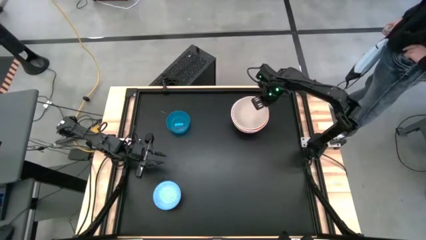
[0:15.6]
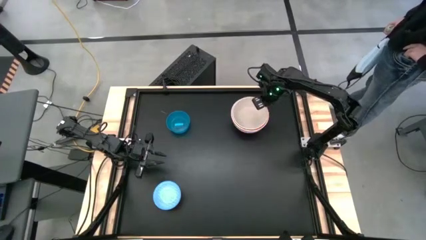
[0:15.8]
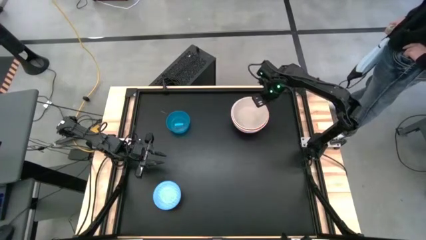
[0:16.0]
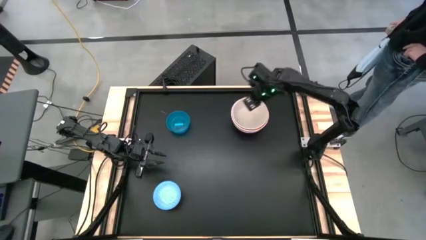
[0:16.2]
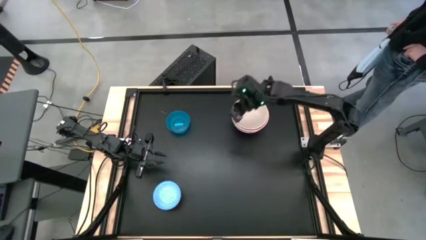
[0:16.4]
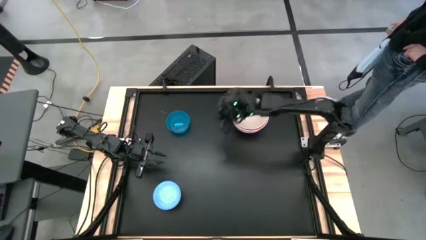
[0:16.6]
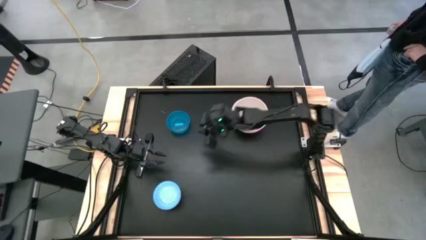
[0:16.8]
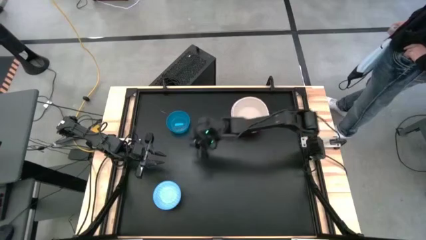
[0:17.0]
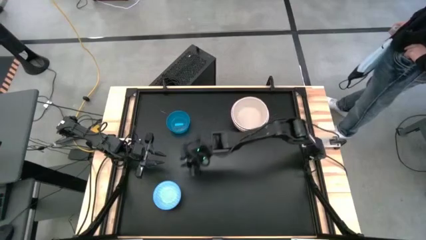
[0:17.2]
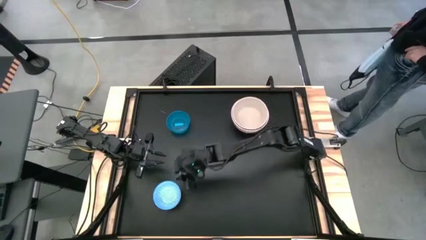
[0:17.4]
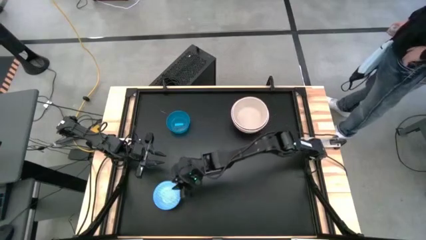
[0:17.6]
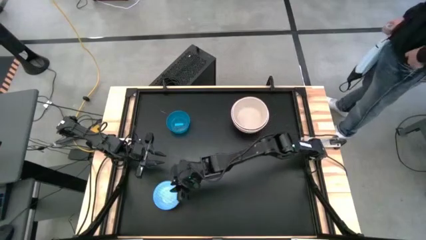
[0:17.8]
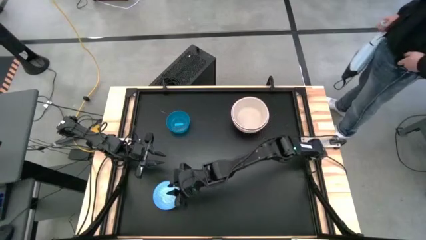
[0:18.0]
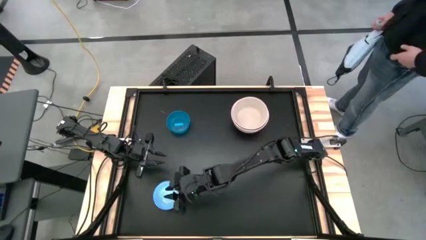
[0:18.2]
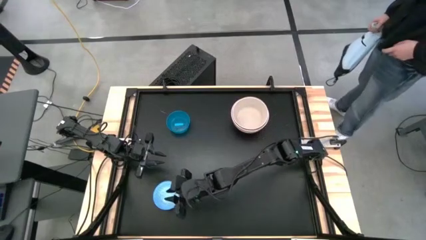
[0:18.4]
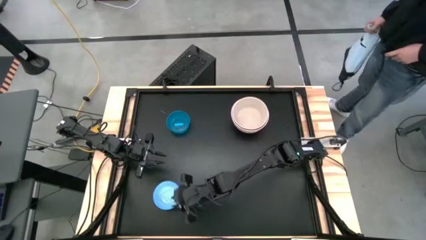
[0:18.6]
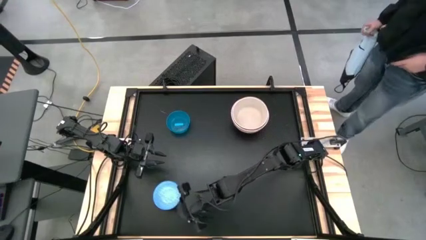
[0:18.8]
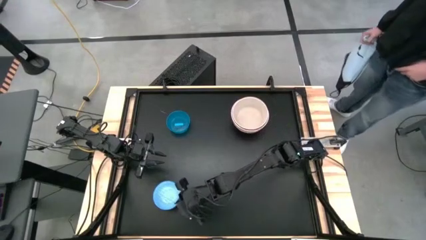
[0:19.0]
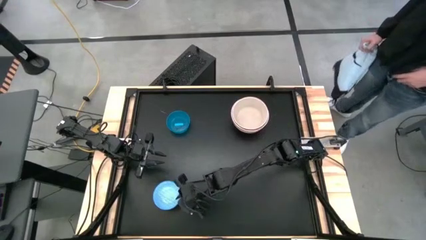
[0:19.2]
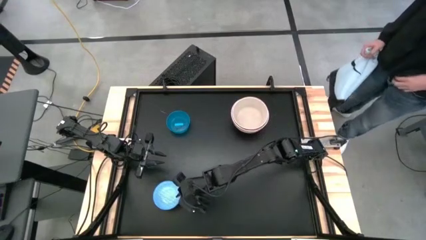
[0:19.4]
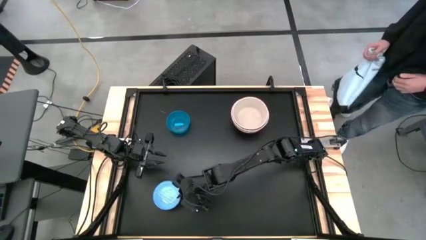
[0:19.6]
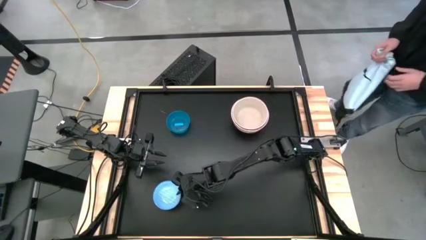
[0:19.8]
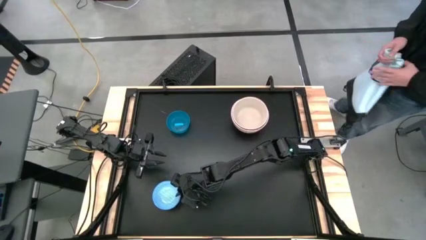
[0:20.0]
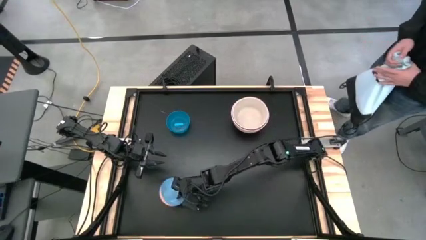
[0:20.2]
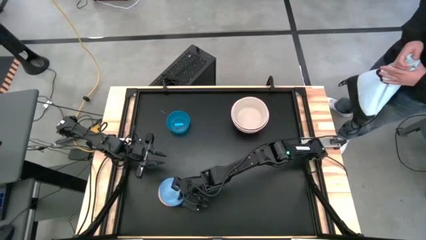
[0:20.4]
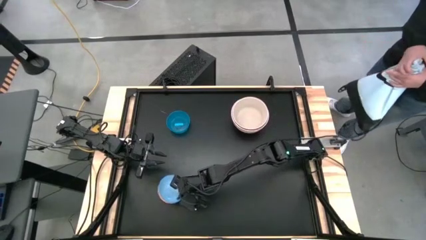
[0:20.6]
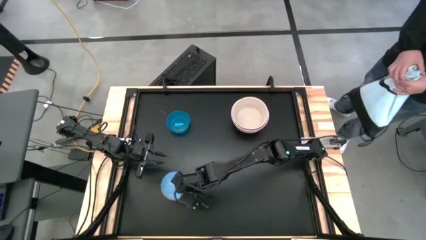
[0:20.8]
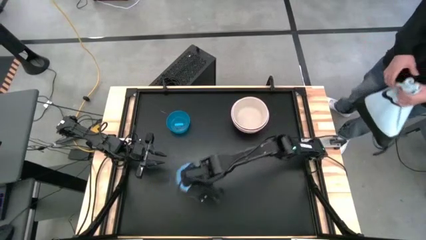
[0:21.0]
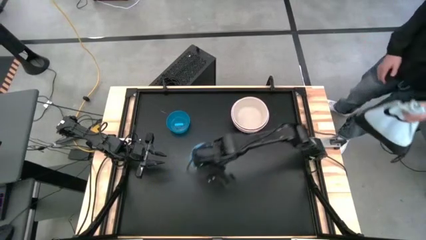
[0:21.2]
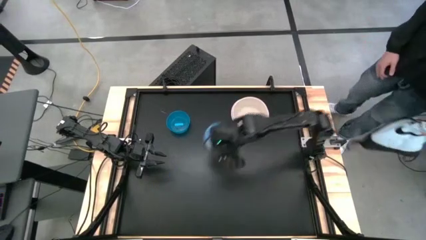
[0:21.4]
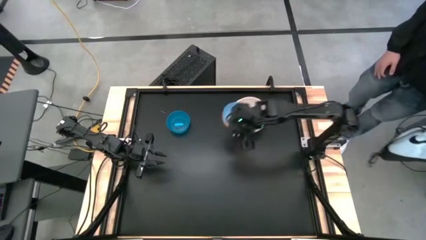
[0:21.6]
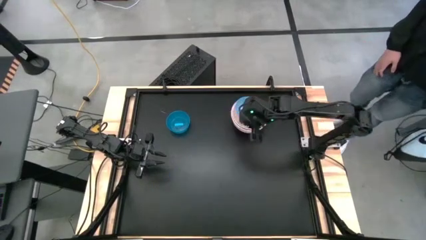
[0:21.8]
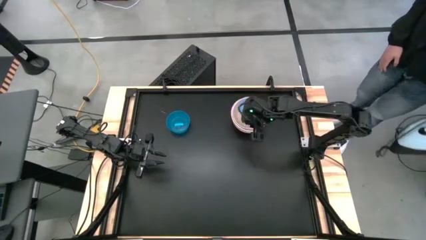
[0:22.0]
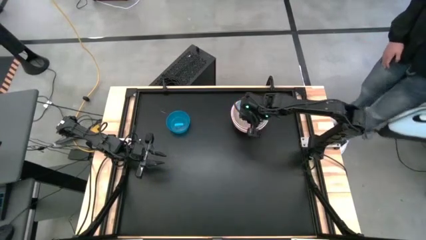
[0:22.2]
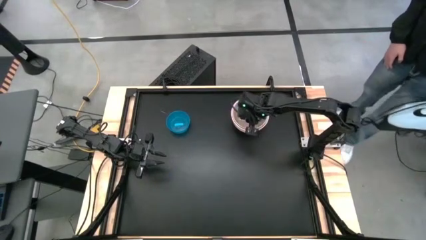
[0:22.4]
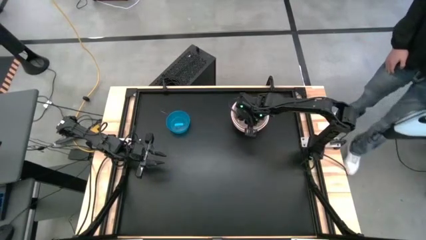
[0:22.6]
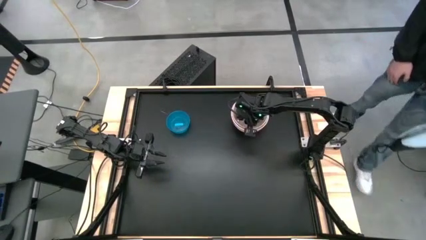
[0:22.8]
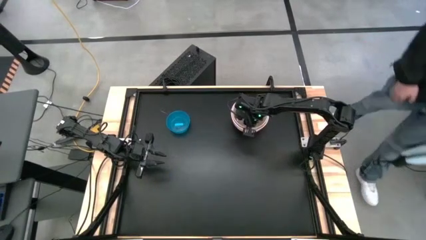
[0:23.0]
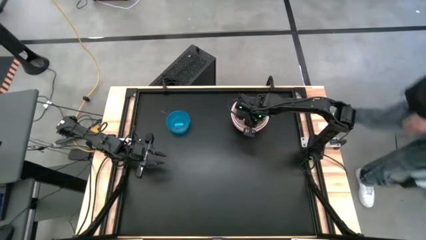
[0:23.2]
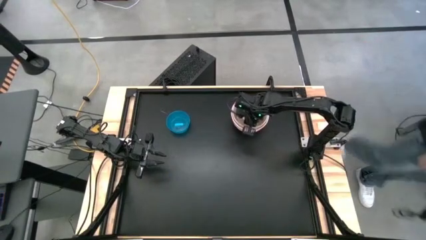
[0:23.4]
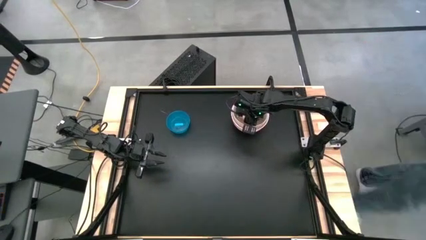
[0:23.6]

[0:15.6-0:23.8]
Stack the orange patterned bowl into the white bowl

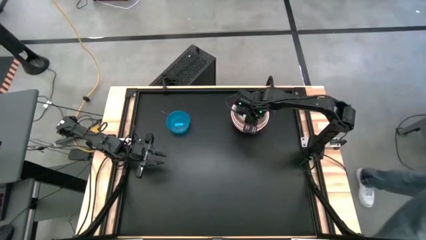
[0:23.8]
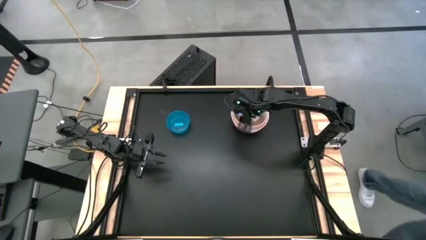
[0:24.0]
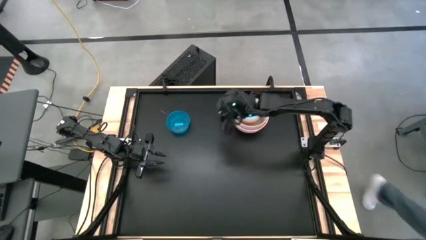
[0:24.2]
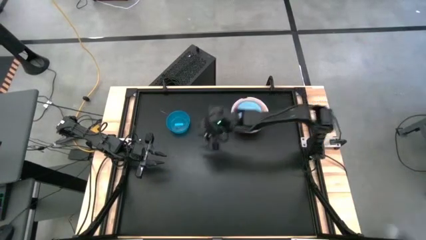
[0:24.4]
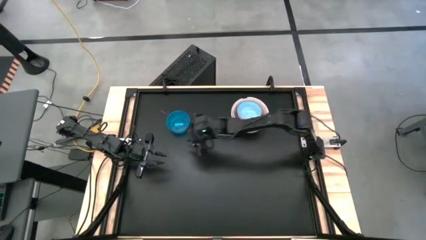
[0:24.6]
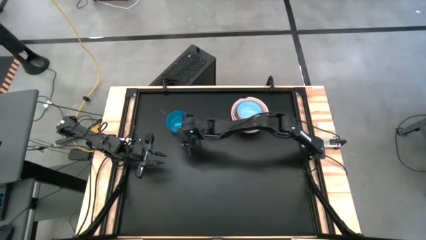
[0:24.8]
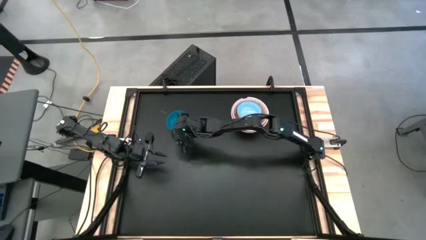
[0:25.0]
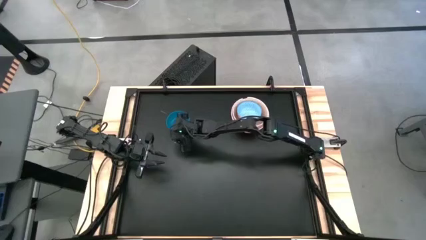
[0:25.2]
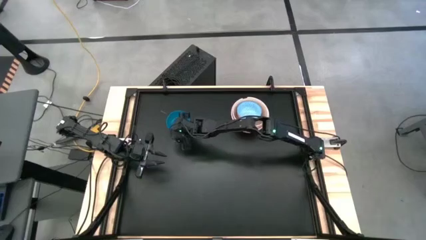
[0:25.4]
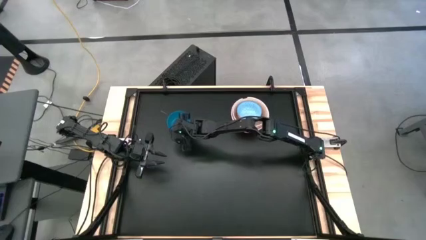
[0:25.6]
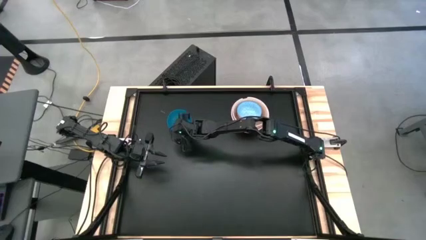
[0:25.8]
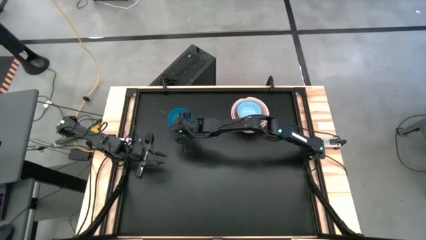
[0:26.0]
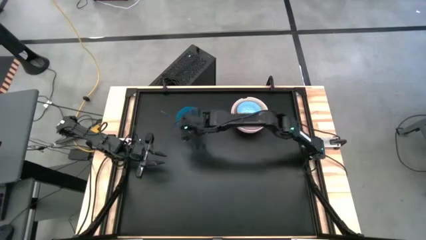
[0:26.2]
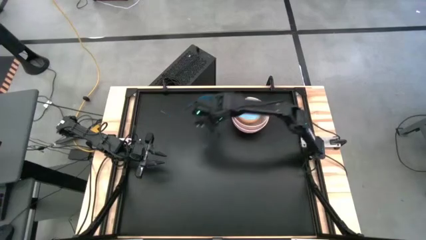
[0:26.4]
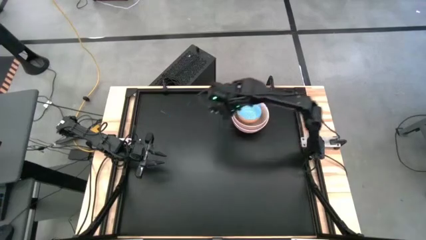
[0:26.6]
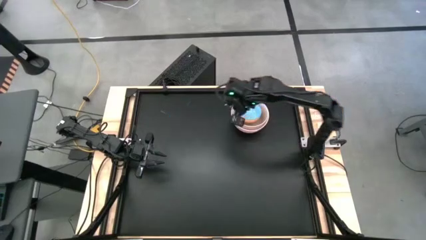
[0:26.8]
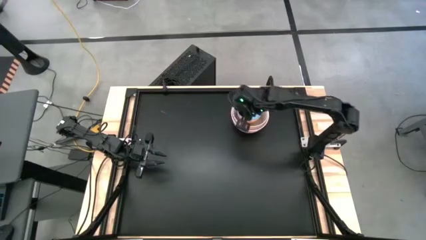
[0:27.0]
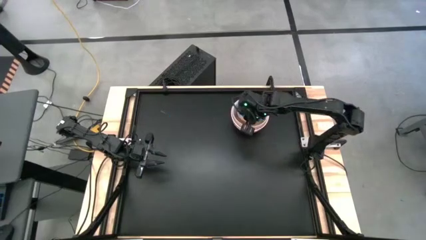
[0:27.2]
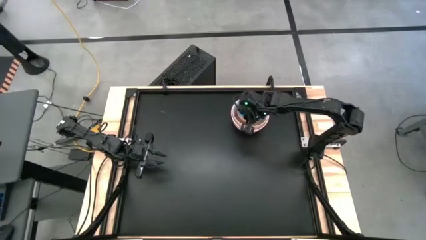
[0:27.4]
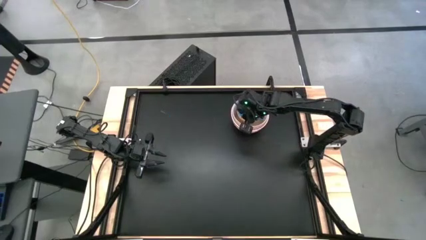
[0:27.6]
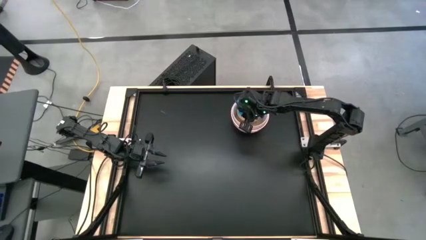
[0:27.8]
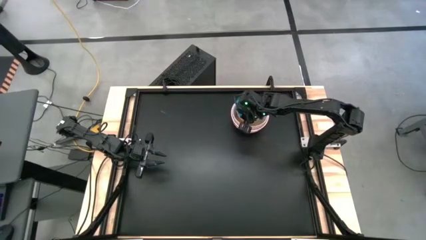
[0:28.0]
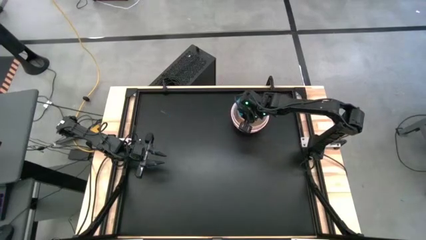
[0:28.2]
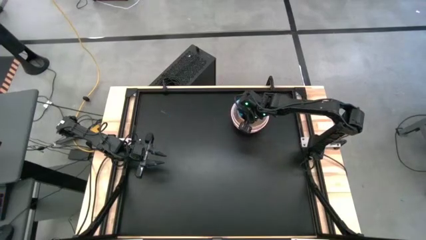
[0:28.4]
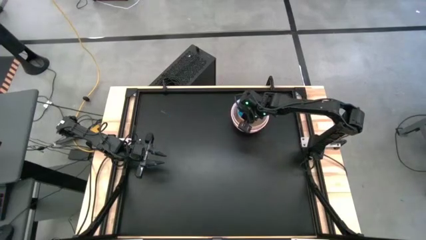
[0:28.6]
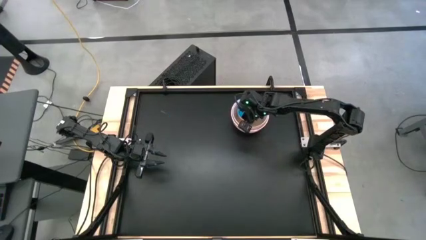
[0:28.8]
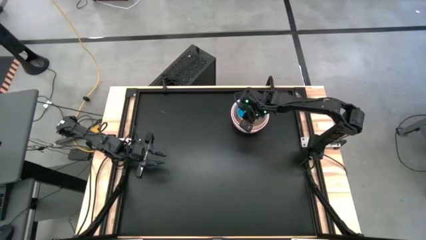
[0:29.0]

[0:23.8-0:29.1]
Stack the blue transparent bowl into the orange patterned bowl

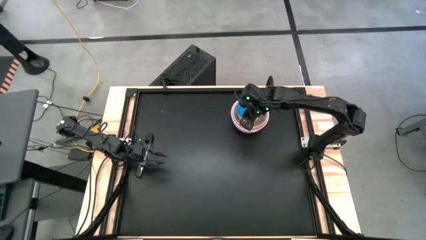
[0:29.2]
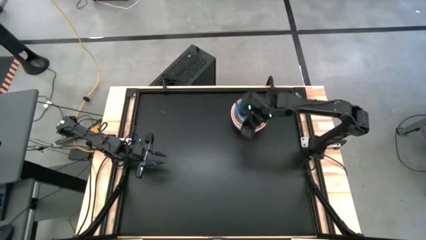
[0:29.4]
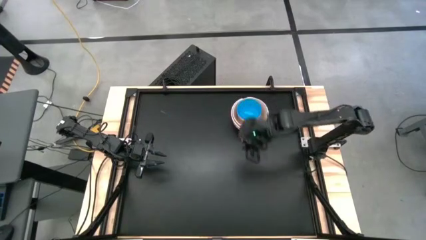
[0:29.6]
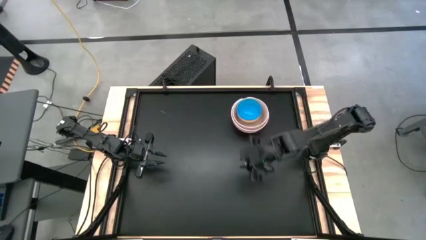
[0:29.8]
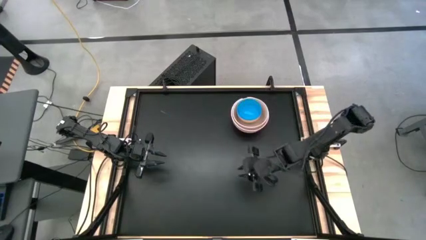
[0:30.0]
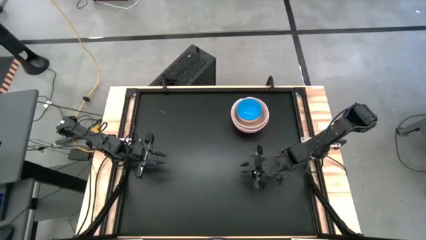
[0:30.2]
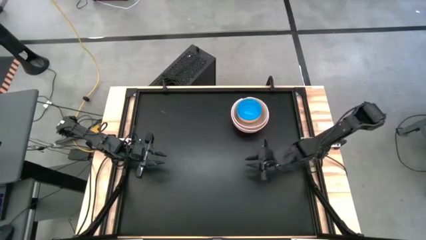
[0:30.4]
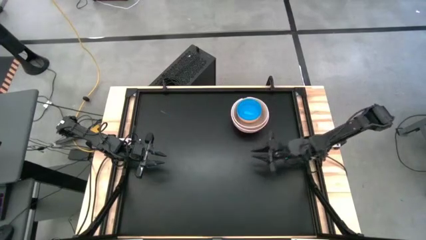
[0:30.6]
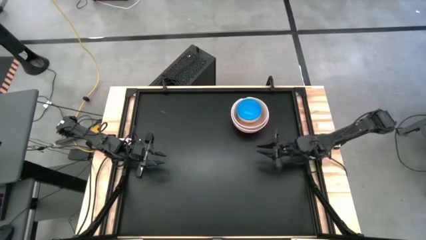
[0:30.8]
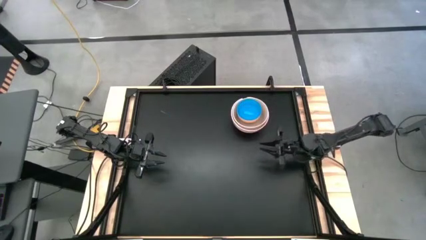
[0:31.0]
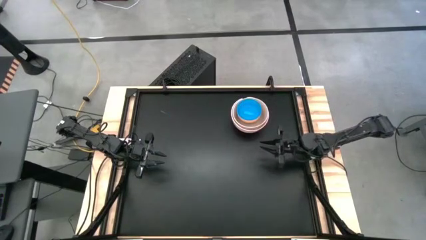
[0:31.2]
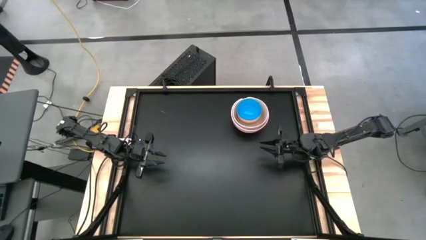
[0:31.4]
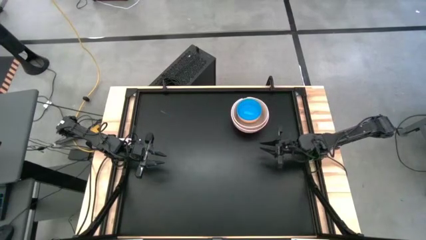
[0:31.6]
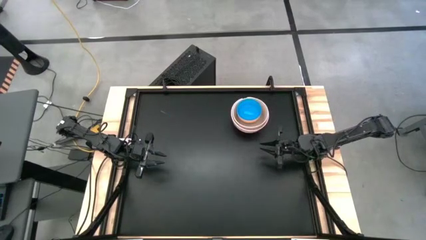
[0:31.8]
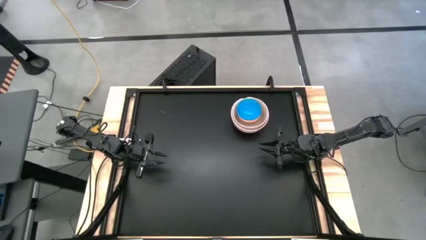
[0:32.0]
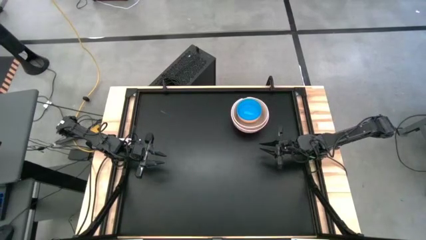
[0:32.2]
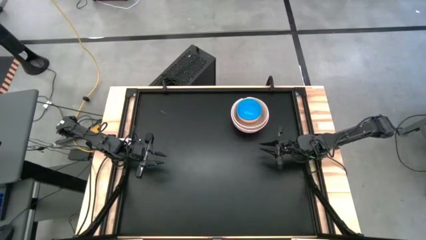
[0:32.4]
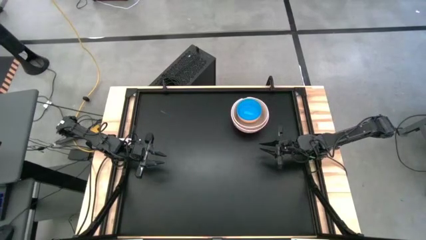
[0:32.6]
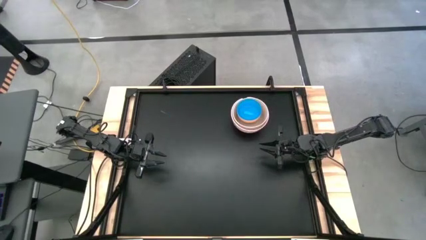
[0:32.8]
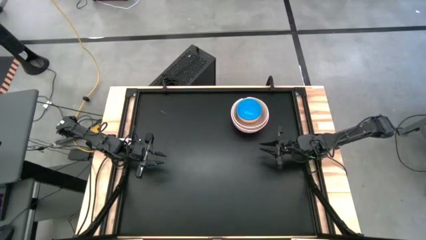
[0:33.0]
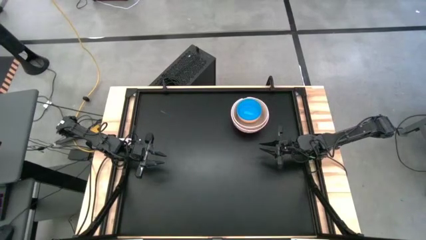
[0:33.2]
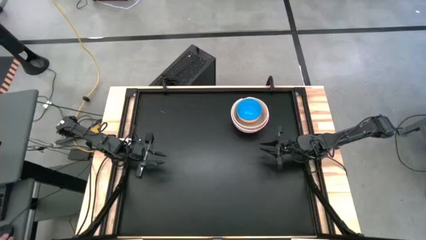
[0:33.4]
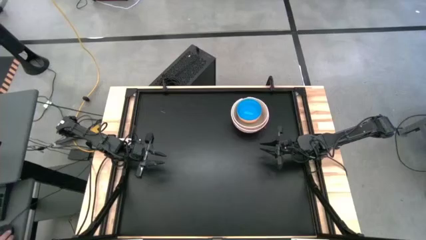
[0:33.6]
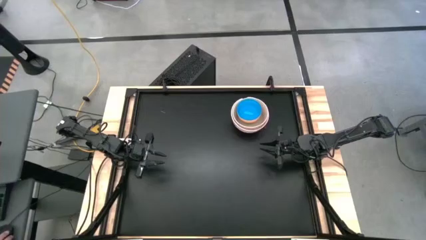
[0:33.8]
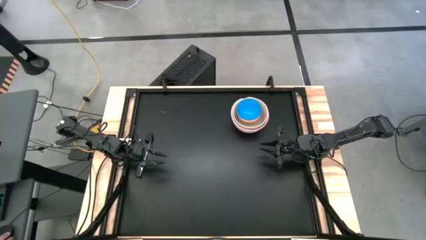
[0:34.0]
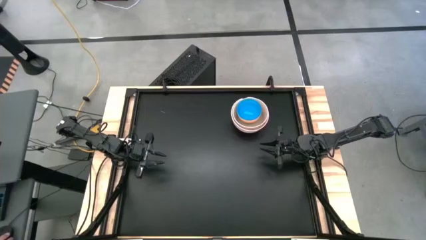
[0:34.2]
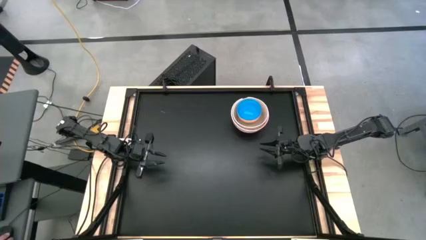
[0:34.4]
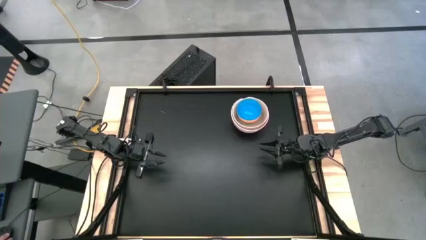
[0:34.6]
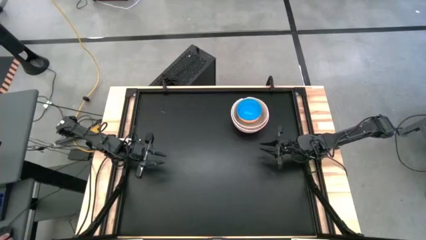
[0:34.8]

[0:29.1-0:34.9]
Return to Home Position
